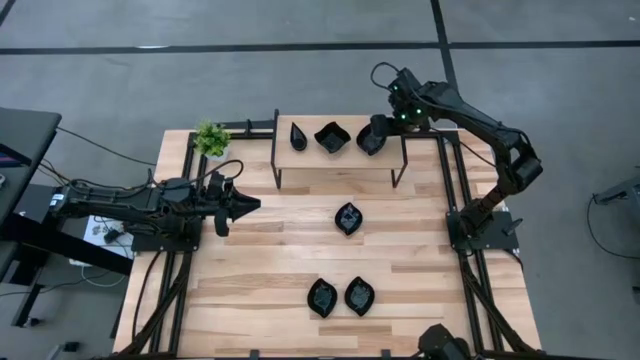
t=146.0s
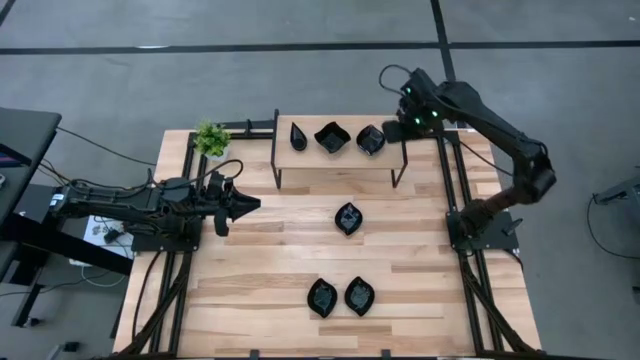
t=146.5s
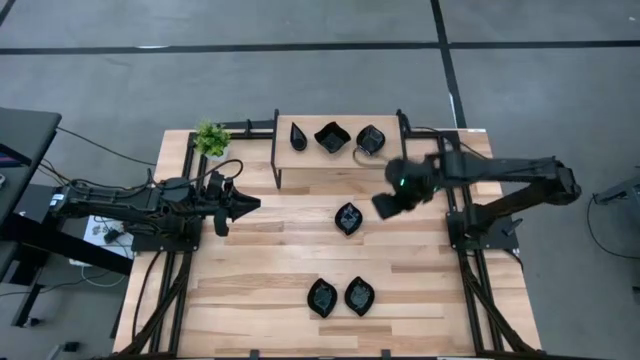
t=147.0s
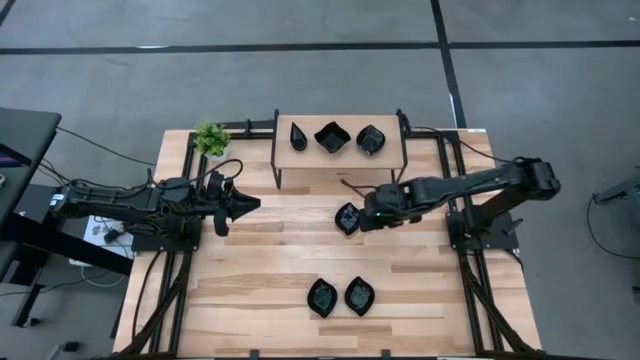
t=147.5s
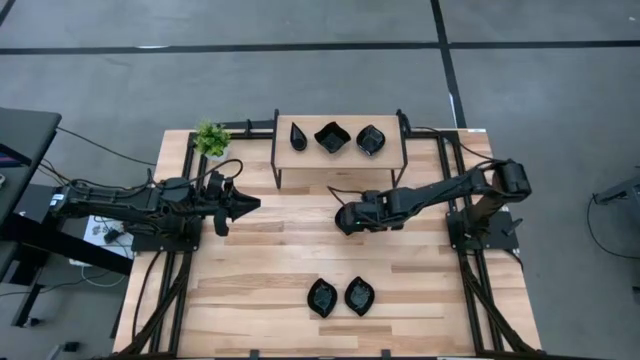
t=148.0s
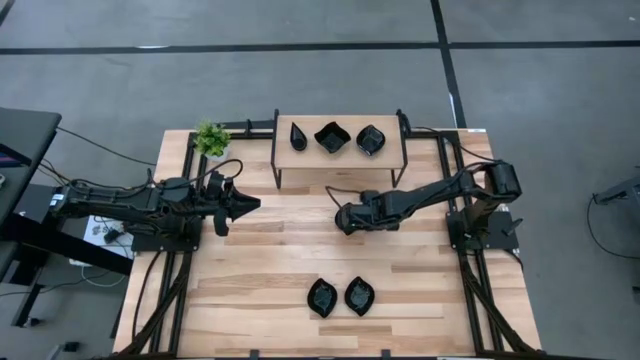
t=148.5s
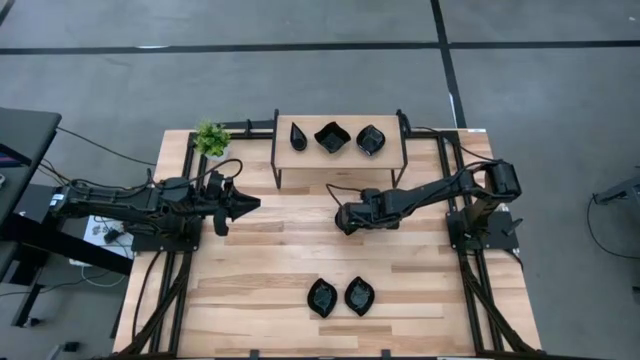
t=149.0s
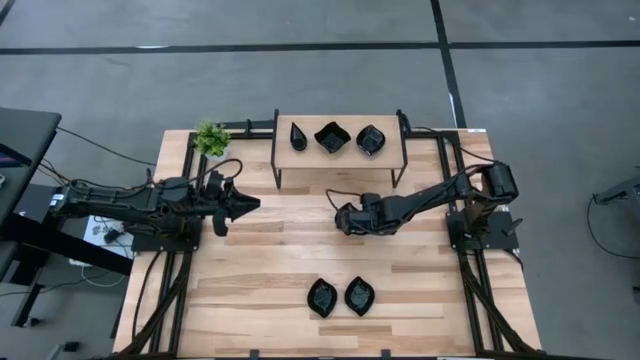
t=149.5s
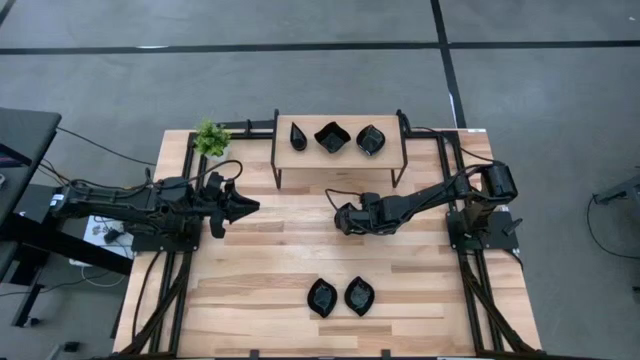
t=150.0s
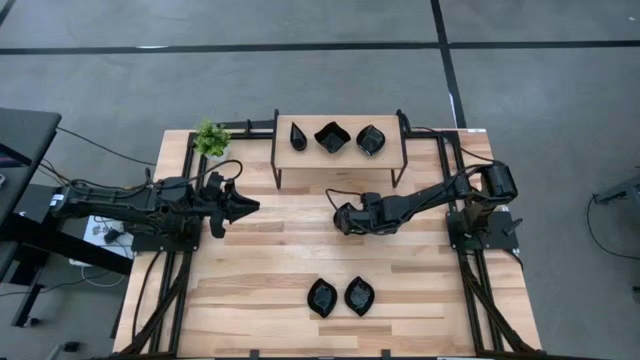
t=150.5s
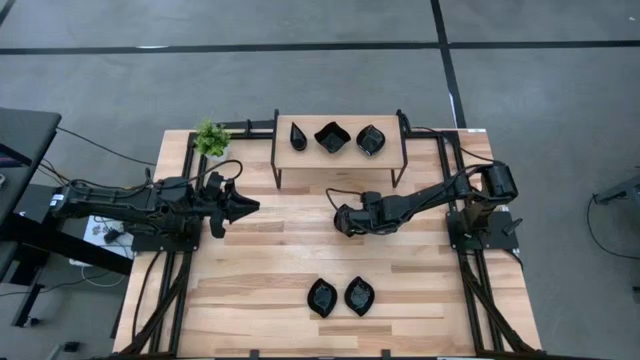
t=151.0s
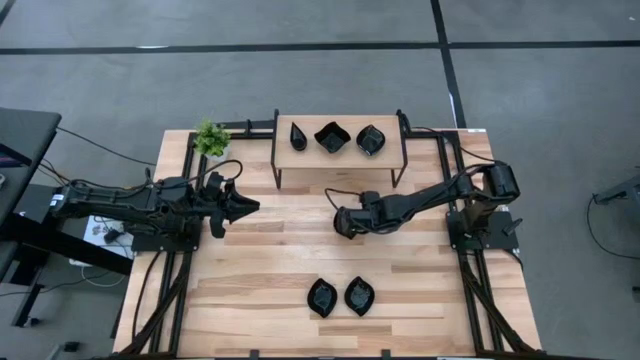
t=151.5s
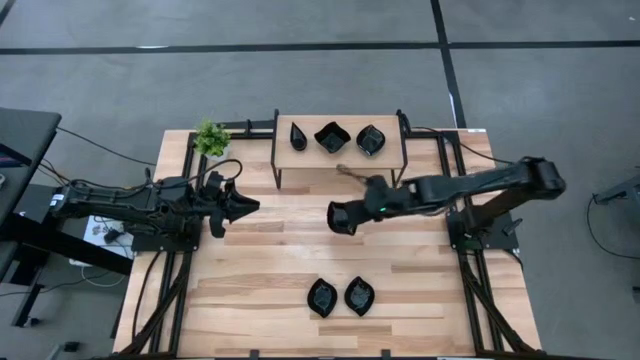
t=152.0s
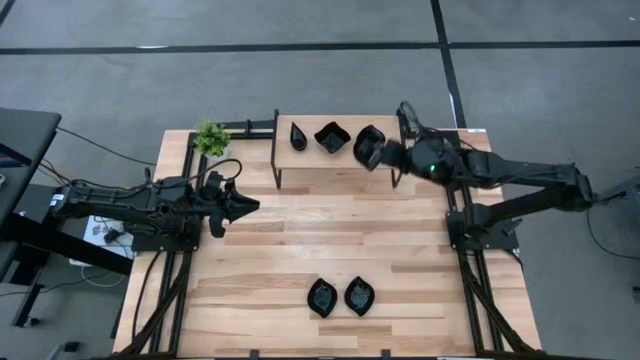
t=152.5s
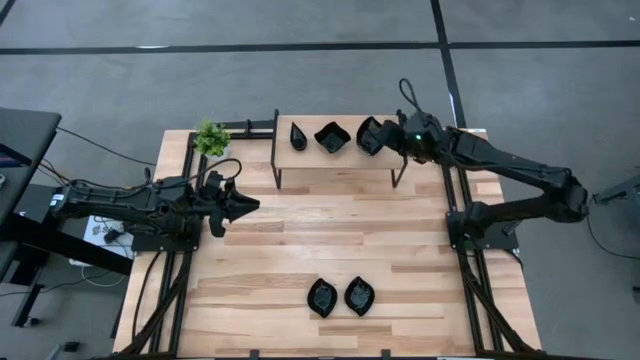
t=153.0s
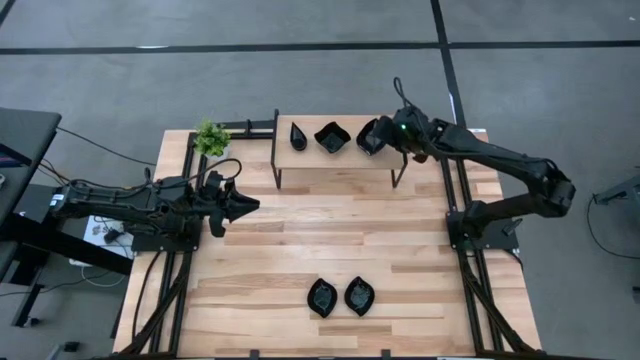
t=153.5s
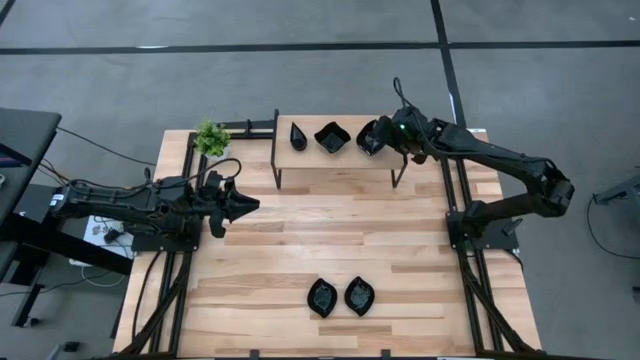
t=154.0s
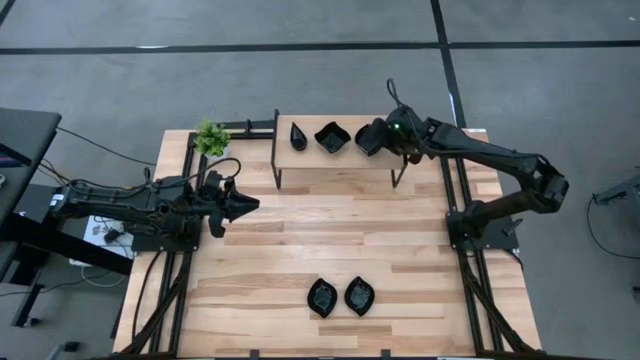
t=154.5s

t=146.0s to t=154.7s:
Task: Pick & Place Mini shaped plates
Stack the leaf shaped plate on top of the leaf shaped plates on the shelf

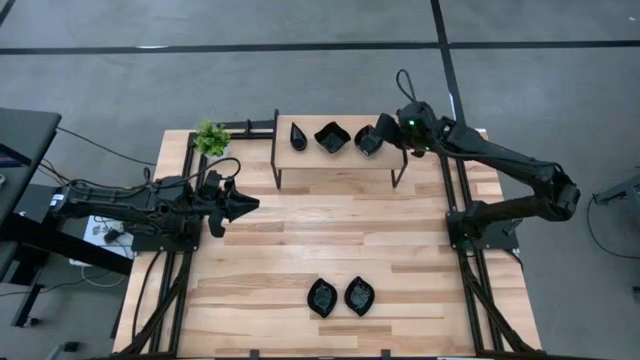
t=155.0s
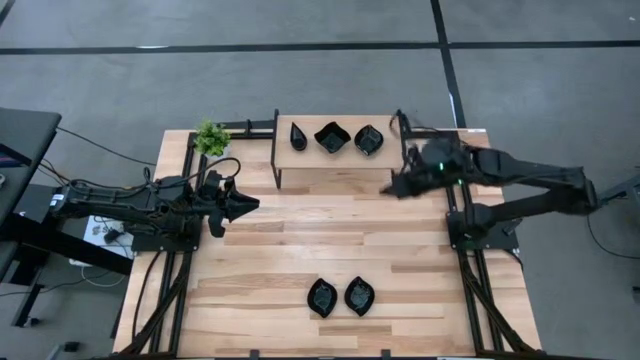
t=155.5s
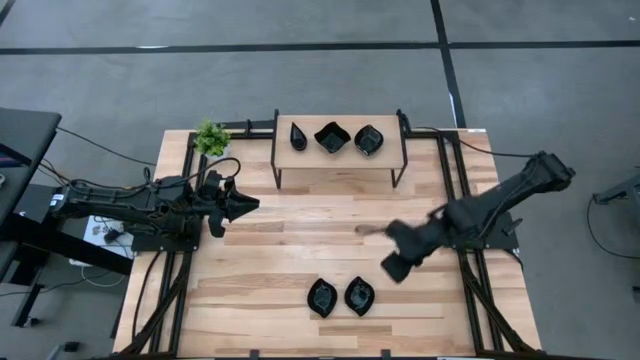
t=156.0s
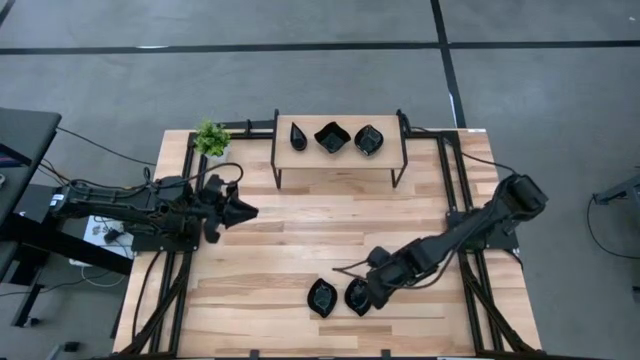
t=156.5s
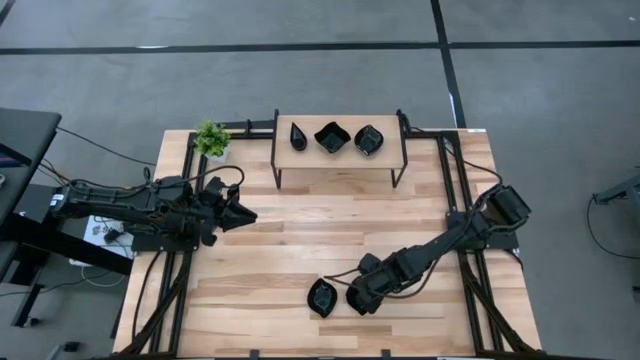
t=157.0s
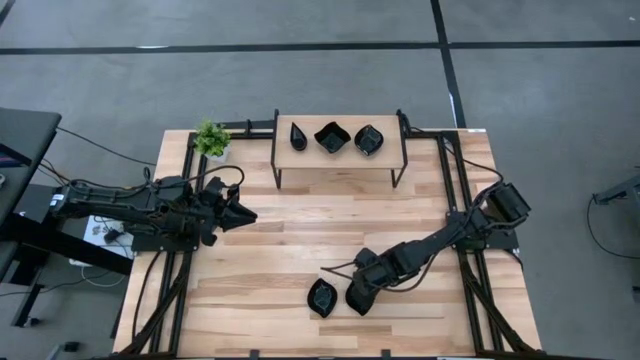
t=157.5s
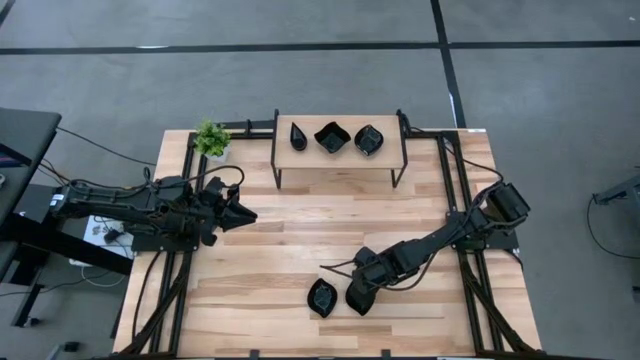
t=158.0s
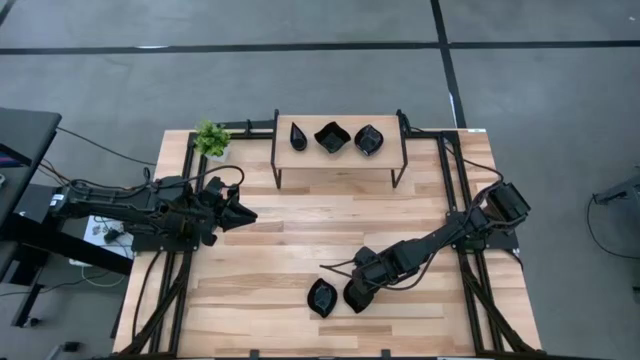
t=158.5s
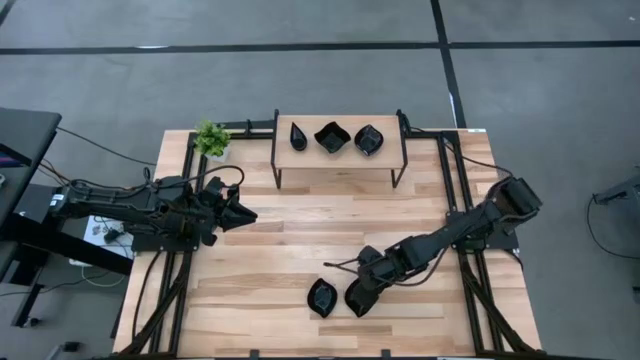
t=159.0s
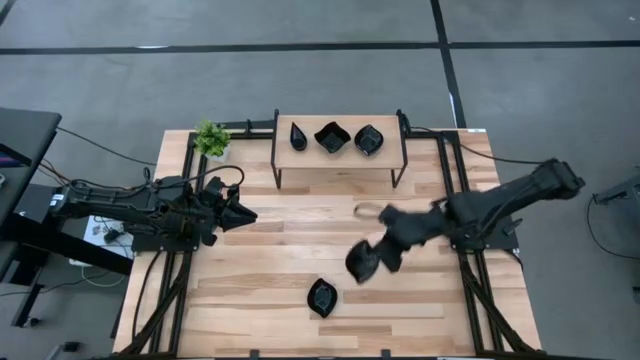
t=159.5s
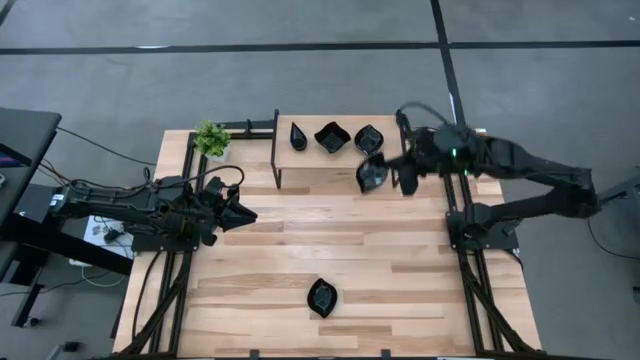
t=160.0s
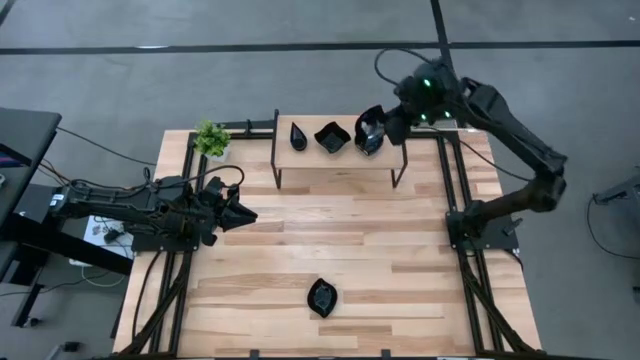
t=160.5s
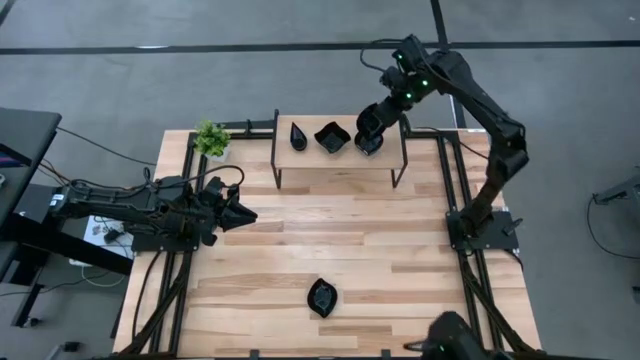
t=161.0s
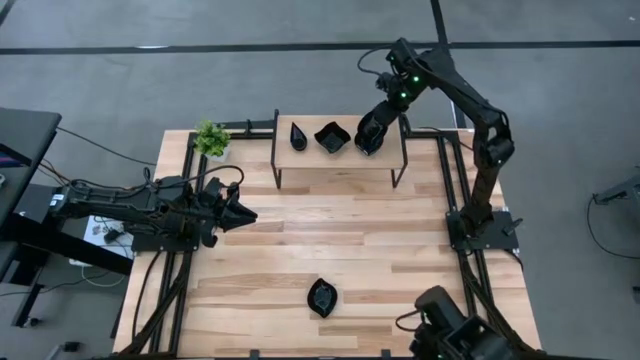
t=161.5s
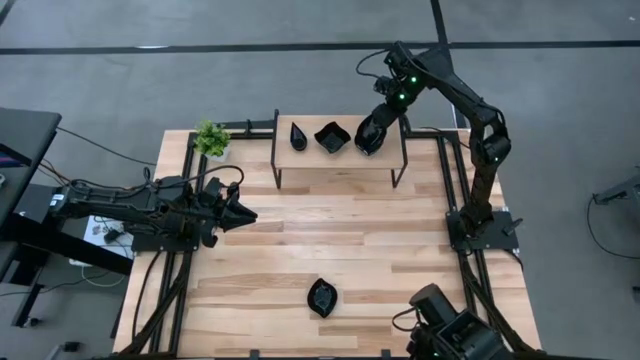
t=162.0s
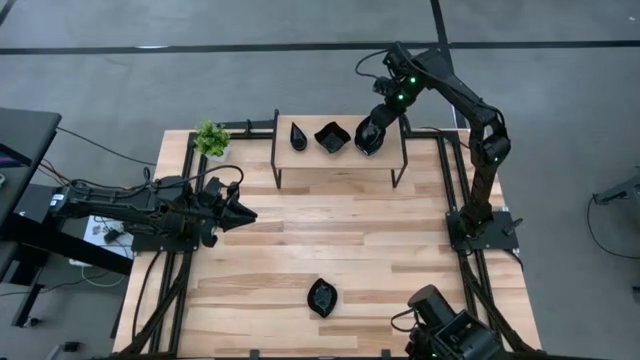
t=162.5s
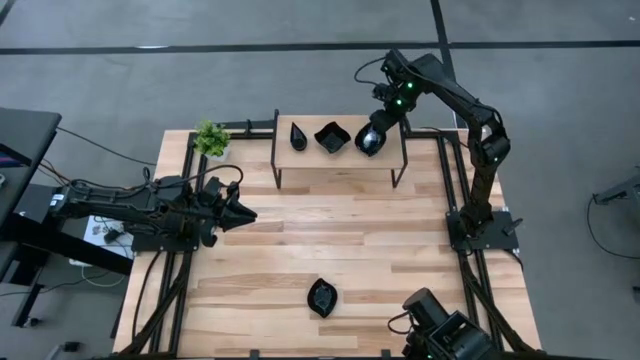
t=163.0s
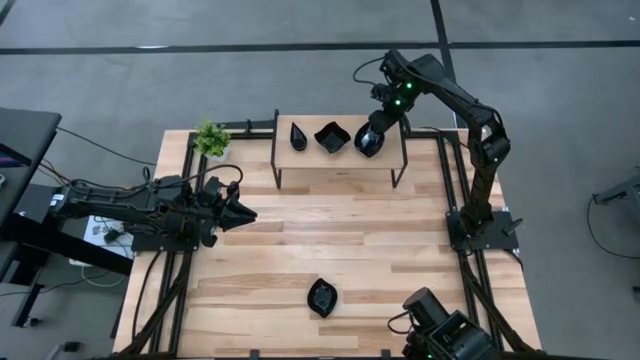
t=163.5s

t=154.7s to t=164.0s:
Stack the leaf shaped plate on top of the leaf shaped plates on the shelf

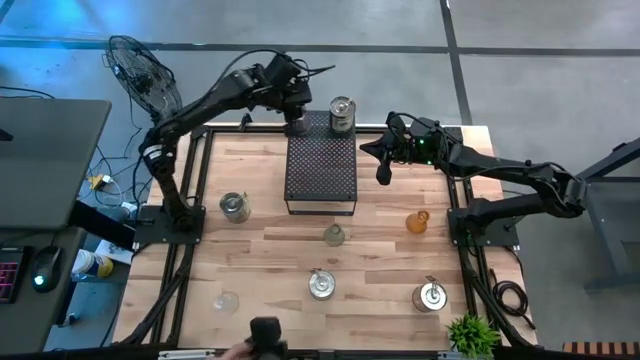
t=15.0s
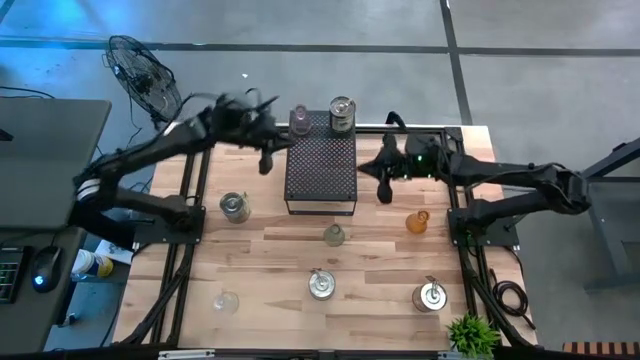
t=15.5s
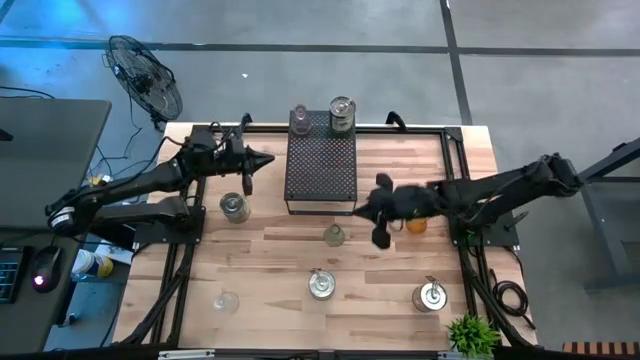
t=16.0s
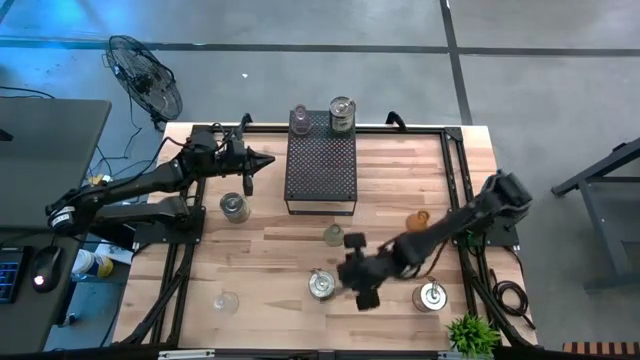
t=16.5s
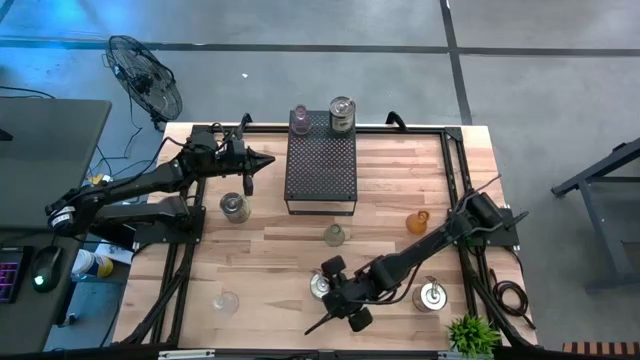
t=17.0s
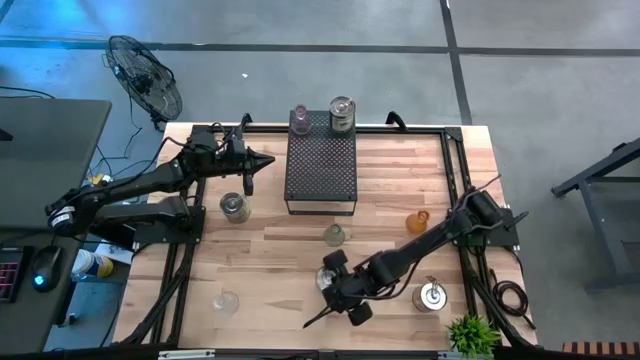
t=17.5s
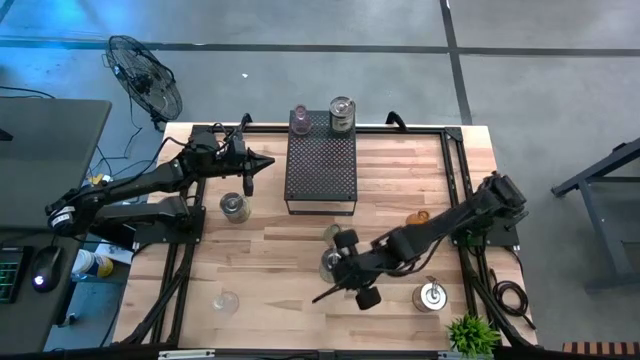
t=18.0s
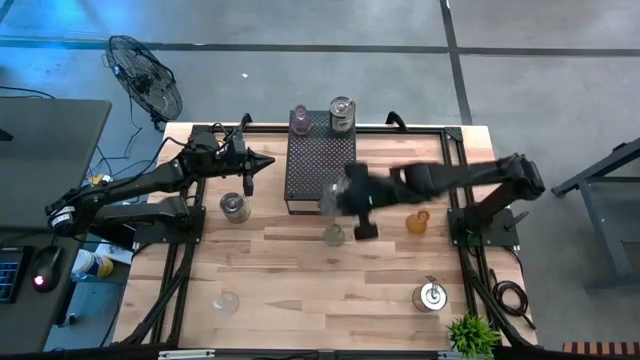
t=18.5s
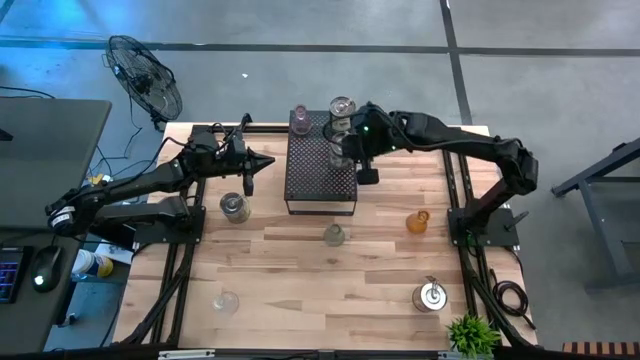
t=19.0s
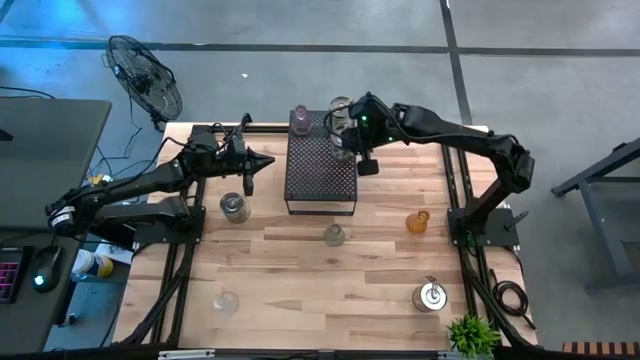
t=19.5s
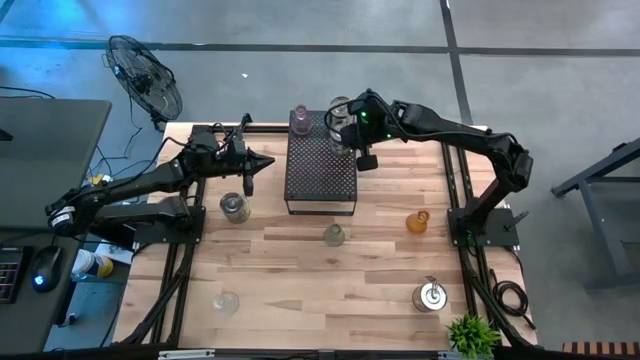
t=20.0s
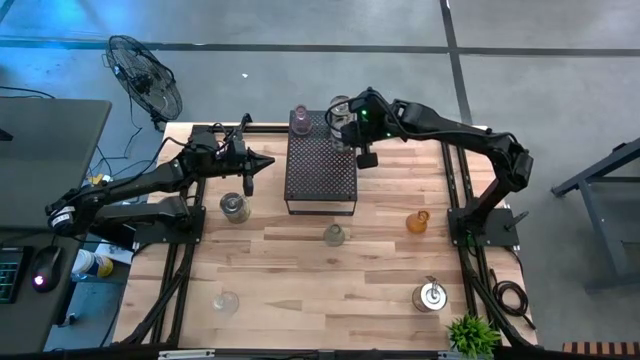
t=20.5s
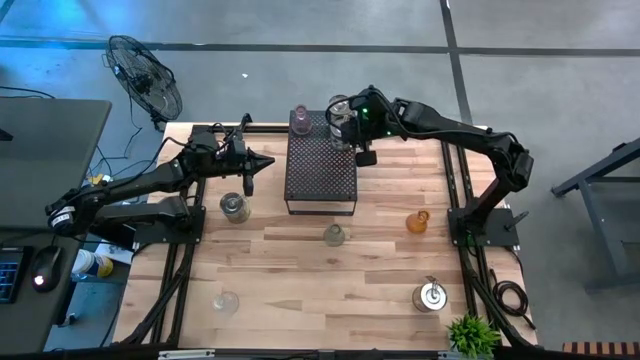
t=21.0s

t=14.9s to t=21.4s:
Task: Pick & Place candle stick holders
Put the brown scented candle on the shelf
